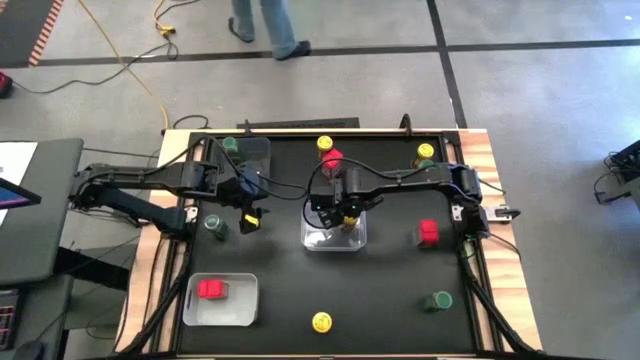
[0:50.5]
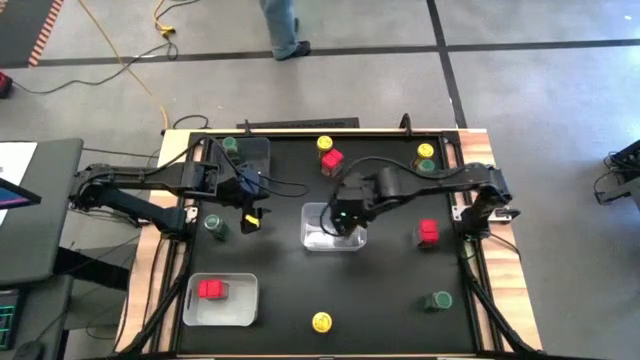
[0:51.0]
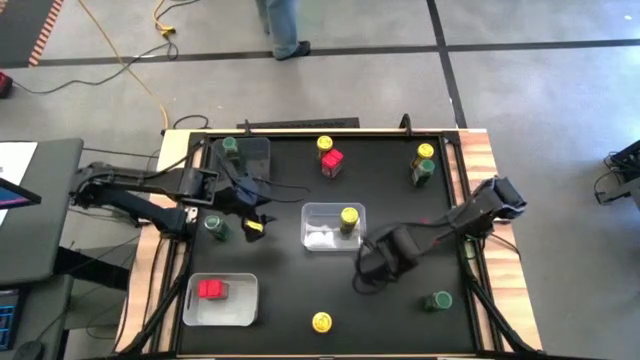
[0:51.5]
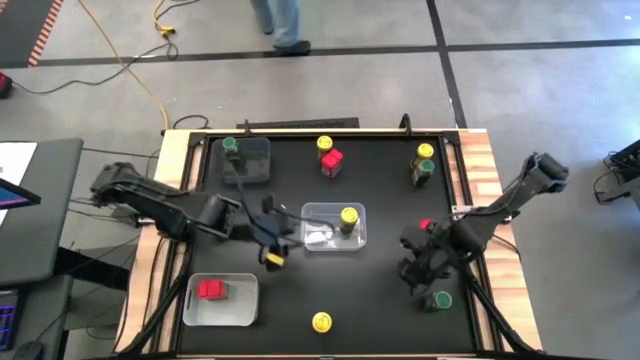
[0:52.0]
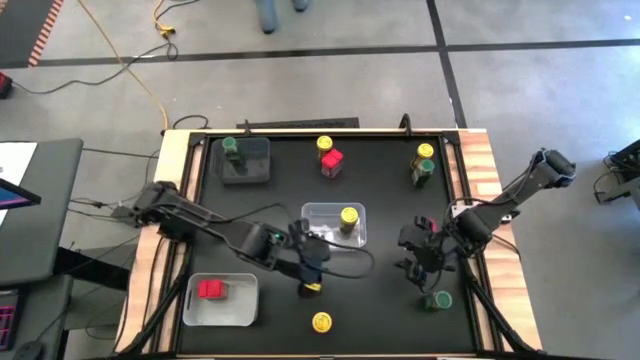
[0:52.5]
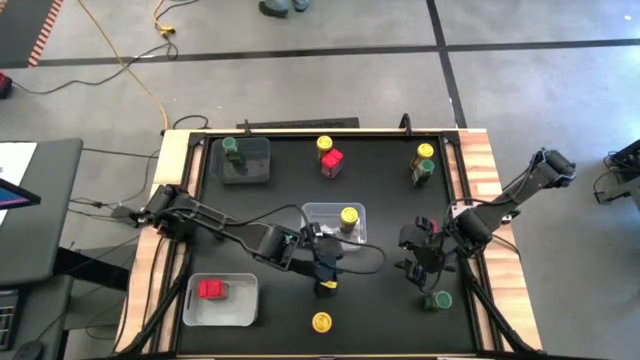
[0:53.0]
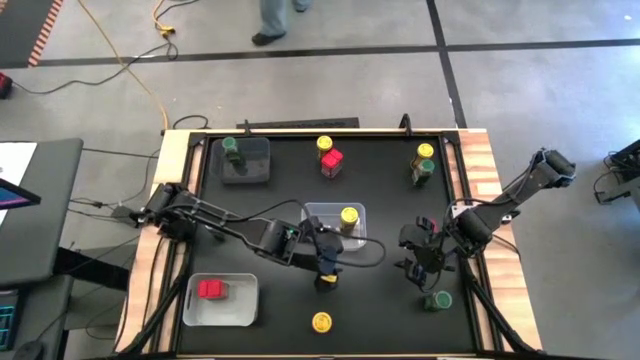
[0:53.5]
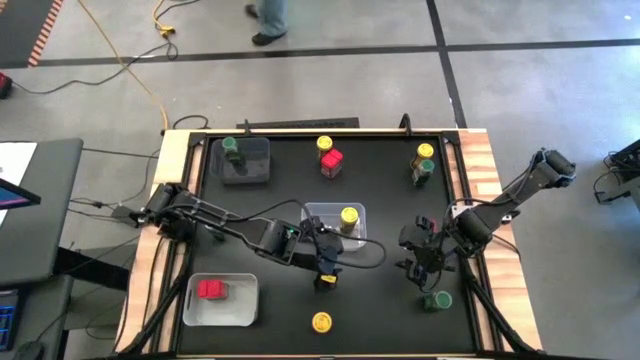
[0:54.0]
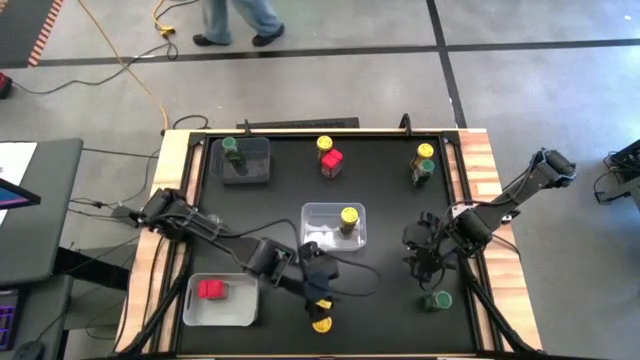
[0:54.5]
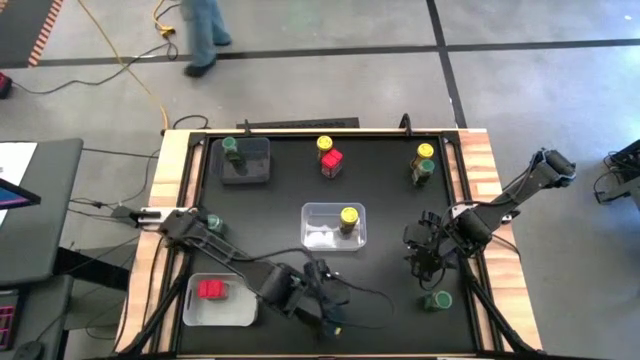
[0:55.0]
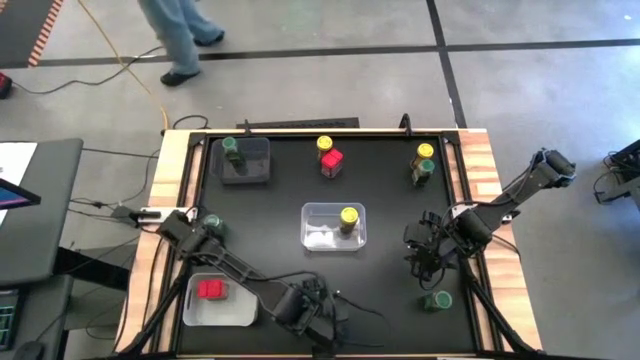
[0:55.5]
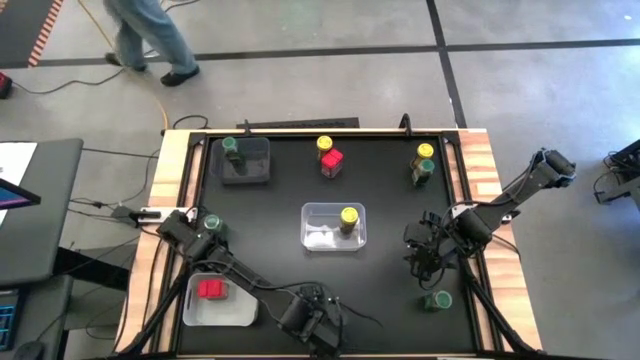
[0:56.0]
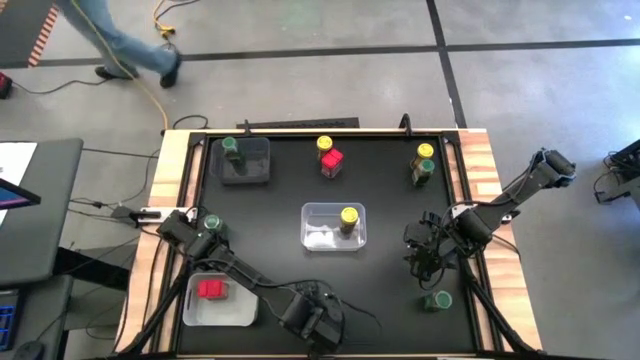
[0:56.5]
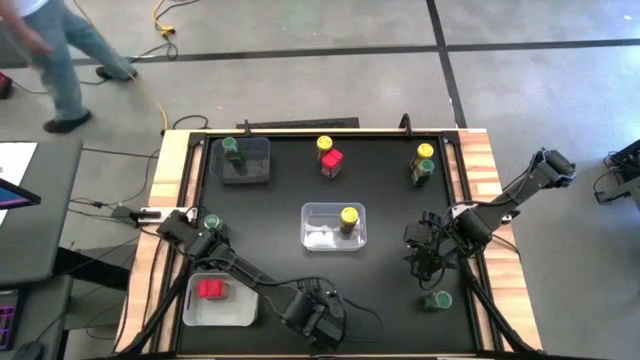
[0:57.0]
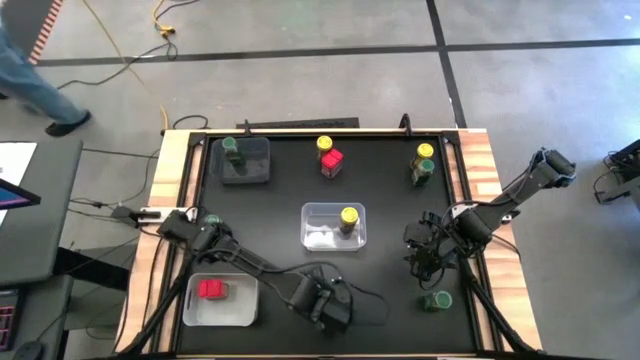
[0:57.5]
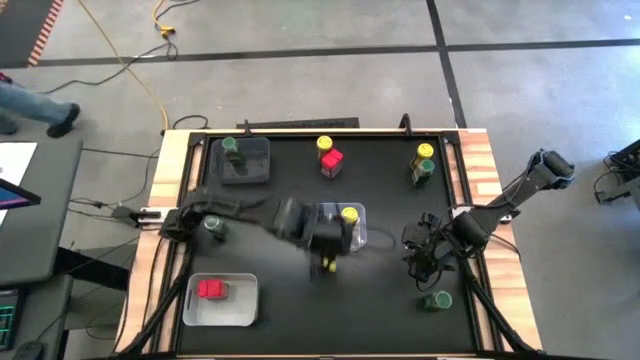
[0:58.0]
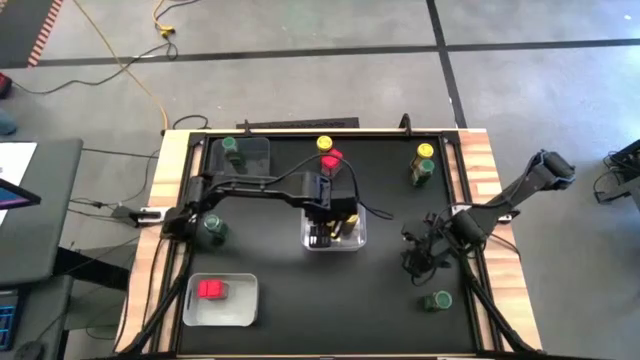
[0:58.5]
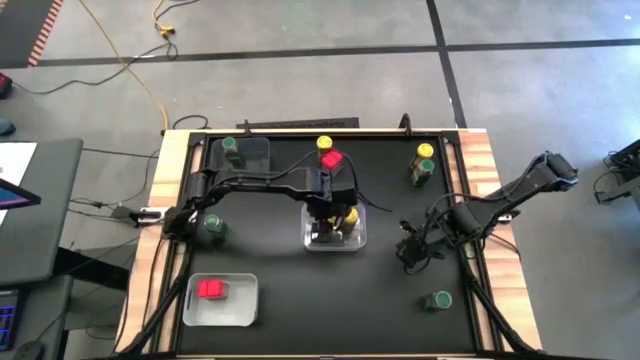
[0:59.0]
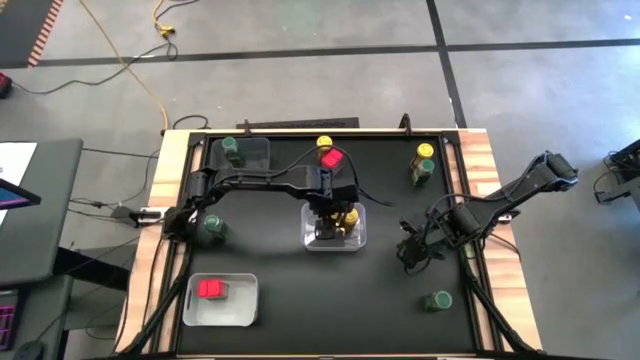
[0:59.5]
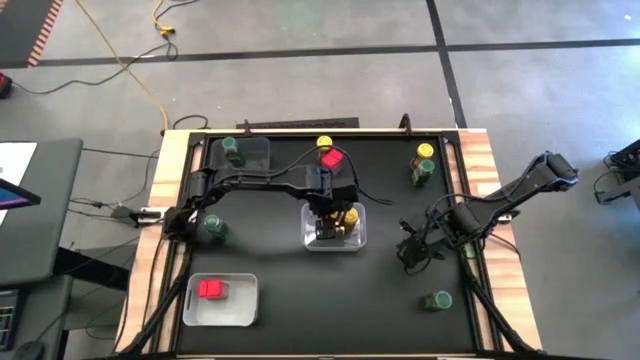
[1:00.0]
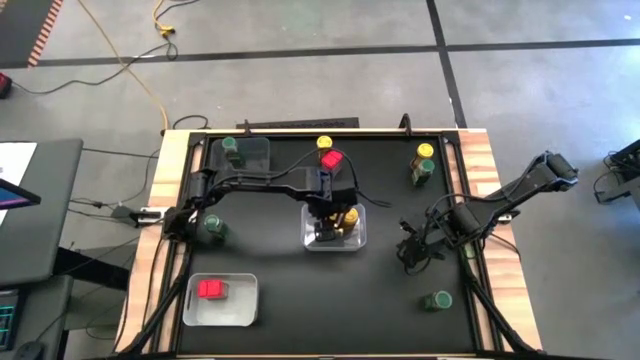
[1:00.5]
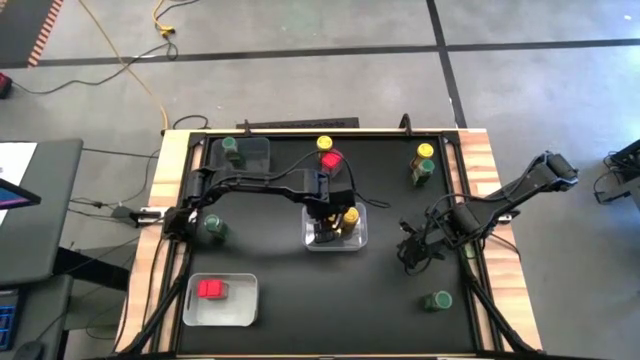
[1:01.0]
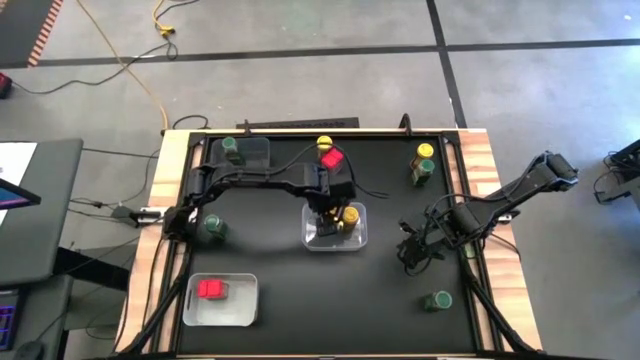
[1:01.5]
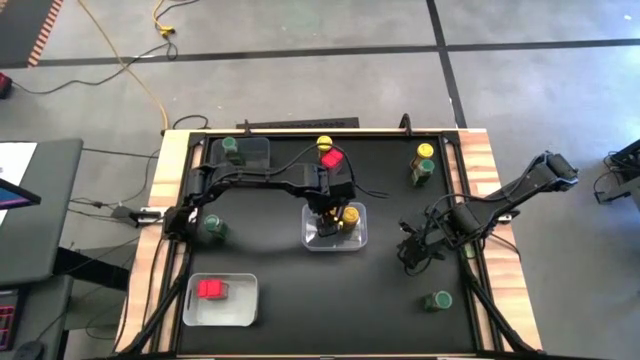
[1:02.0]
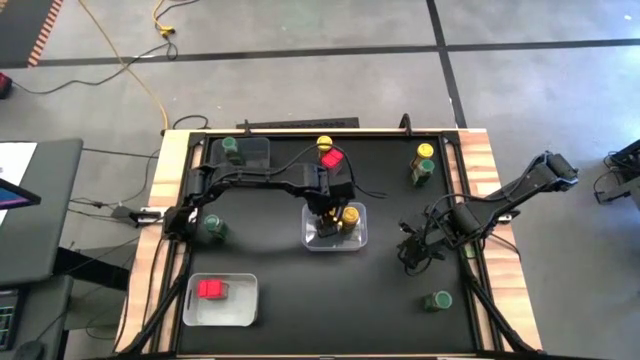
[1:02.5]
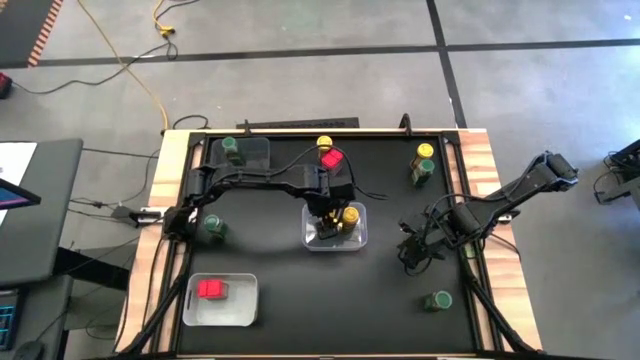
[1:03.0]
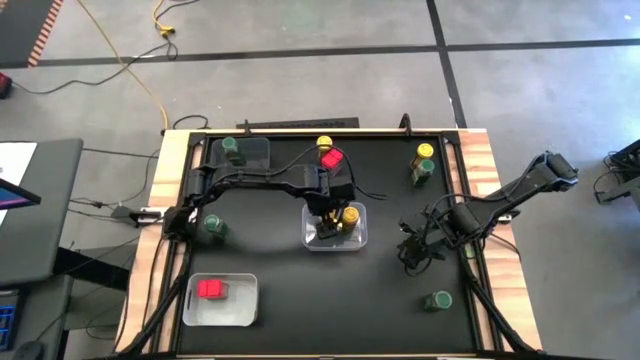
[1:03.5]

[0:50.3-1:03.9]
Task: Sort spices by type
Put the yellow seasoning bottle into the transparent bin

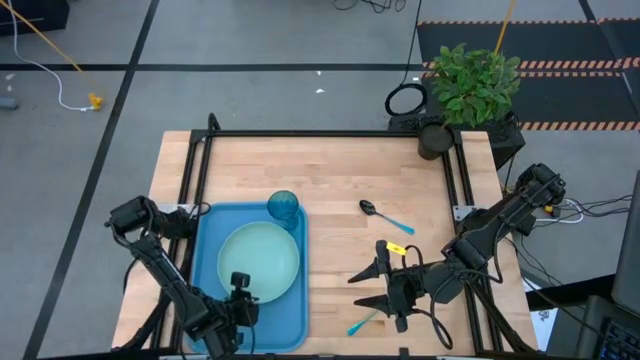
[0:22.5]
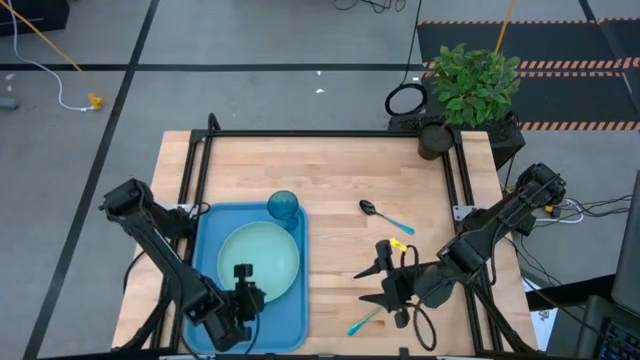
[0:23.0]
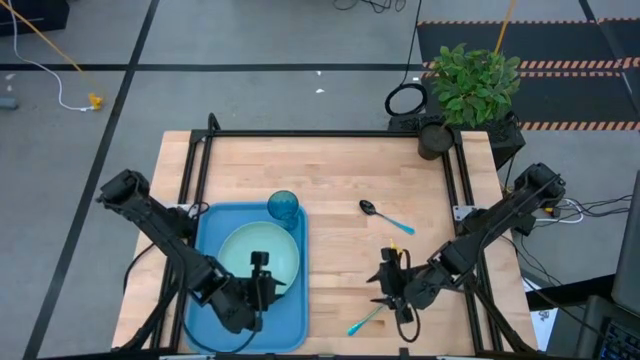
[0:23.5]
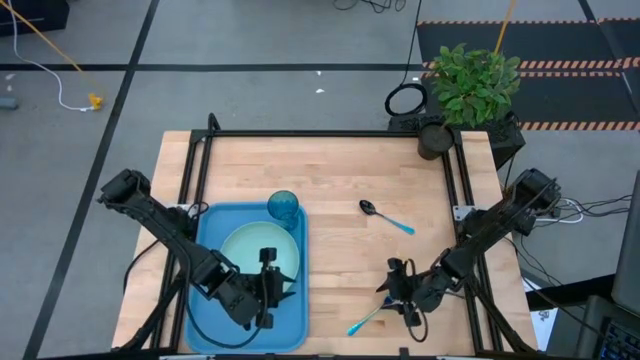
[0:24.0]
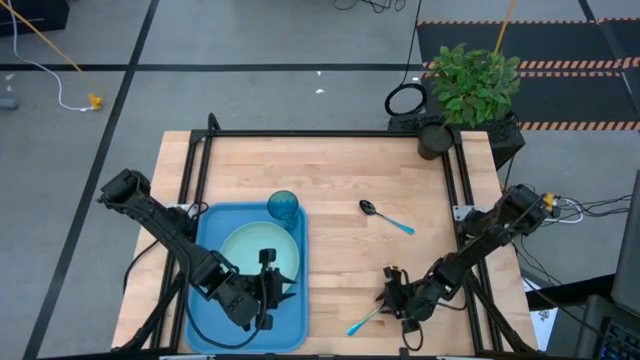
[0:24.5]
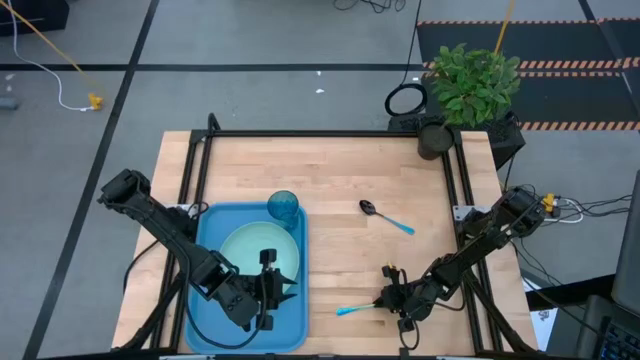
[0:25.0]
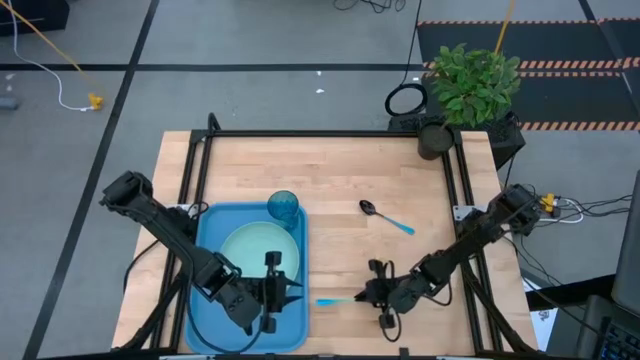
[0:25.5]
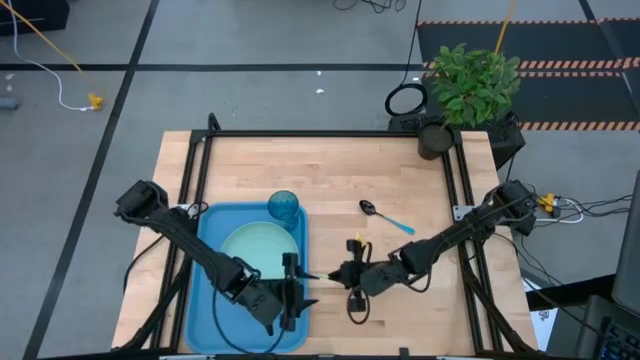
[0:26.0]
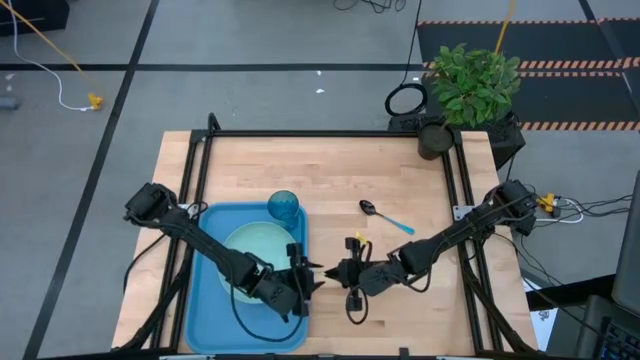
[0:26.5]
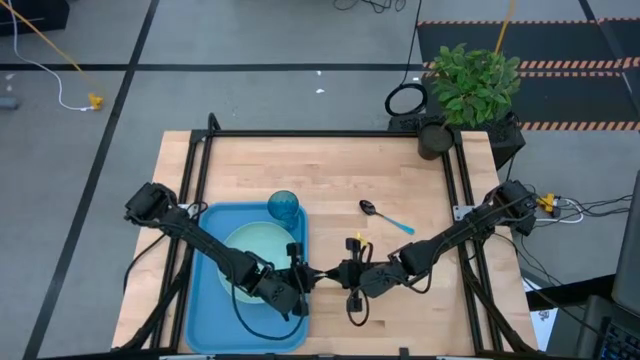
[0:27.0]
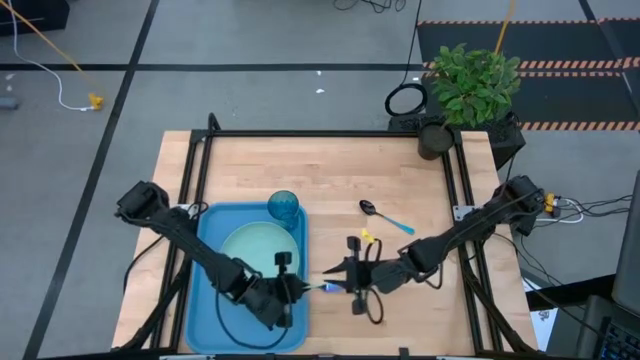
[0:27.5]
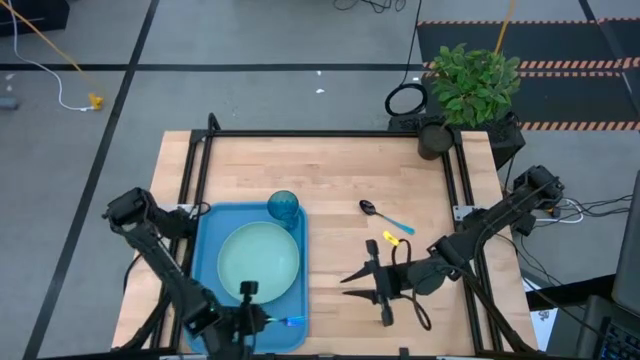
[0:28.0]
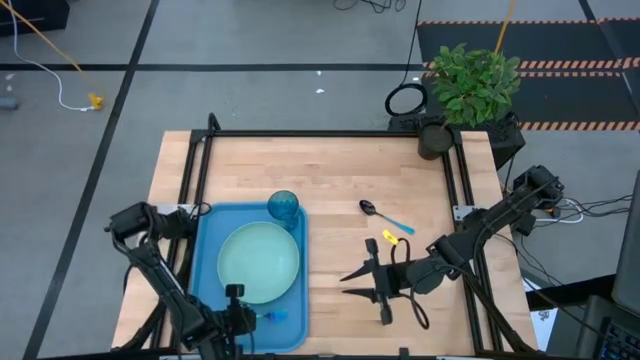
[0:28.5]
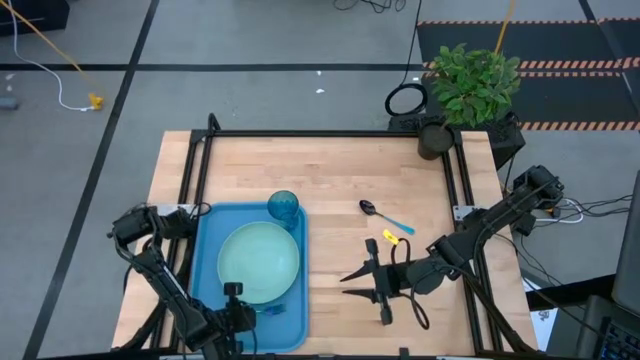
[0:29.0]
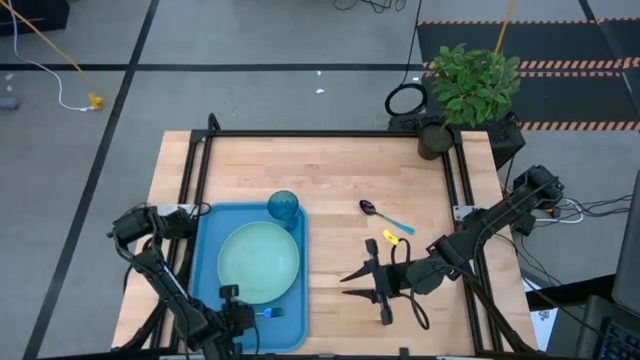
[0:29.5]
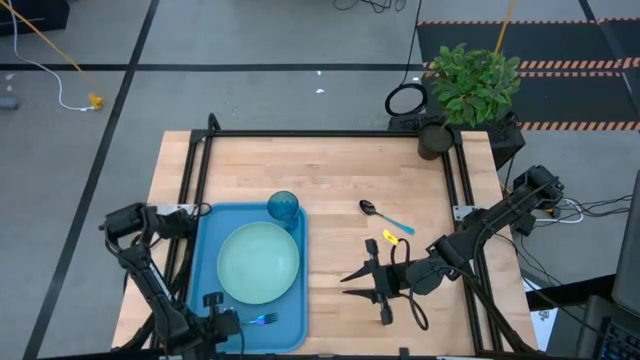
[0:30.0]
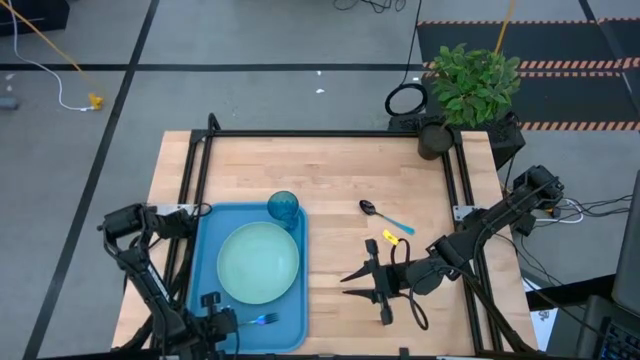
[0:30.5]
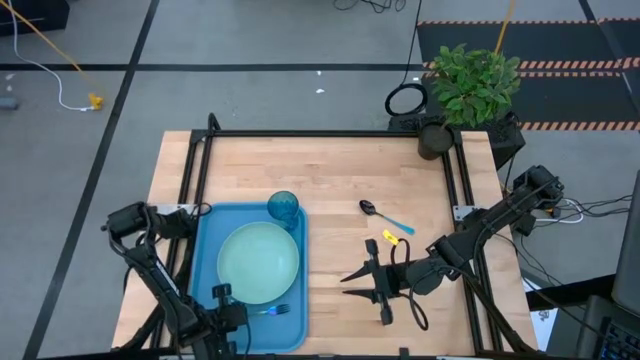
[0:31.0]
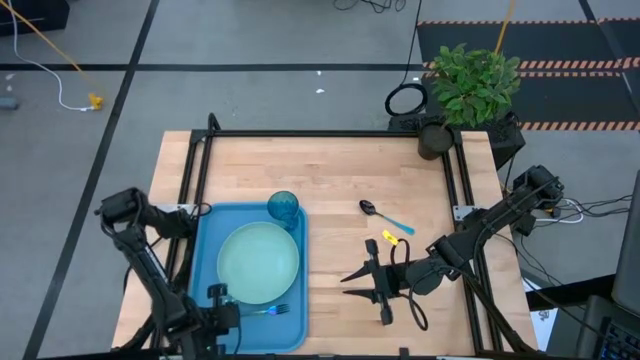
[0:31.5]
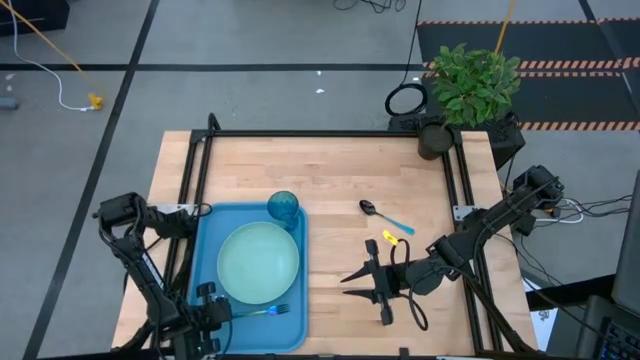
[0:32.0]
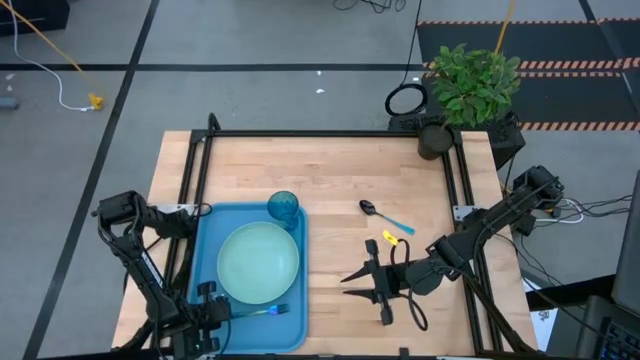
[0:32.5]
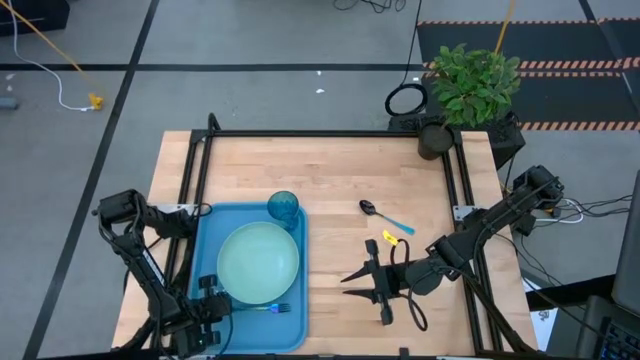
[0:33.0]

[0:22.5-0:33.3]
Task: Pick and place plate/cup/fork/spoon on tray
Put the blue fork on the blue tray to the bottom of the green plate
